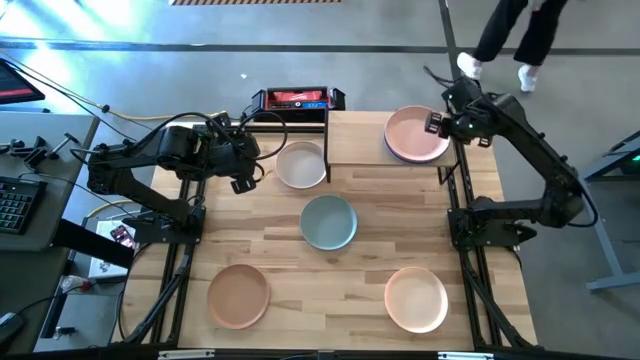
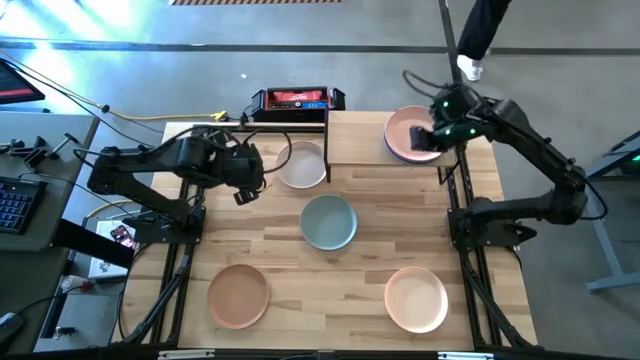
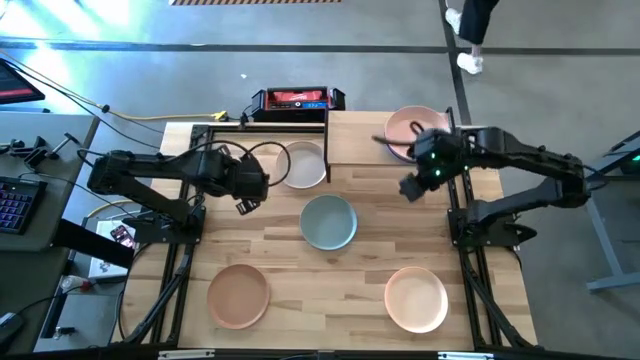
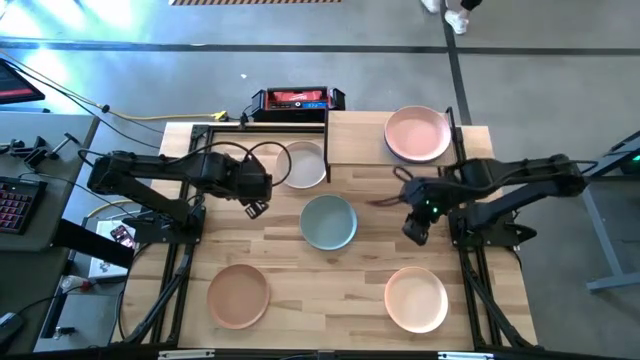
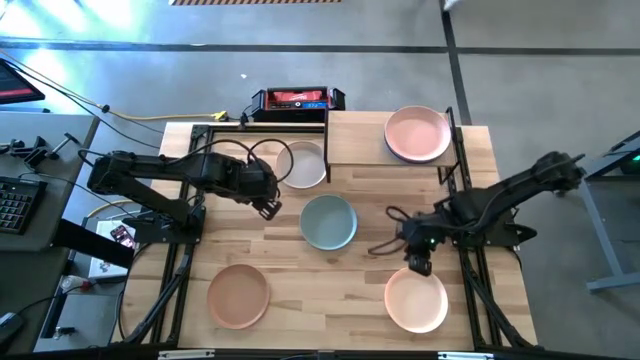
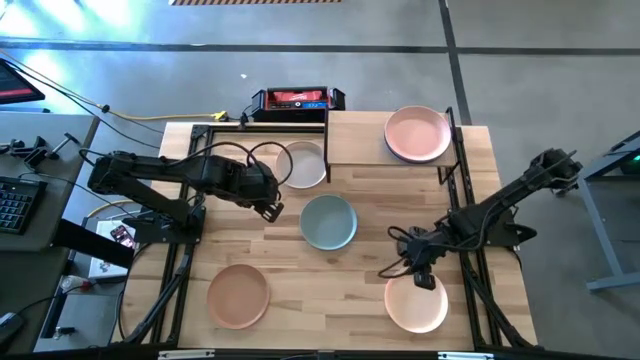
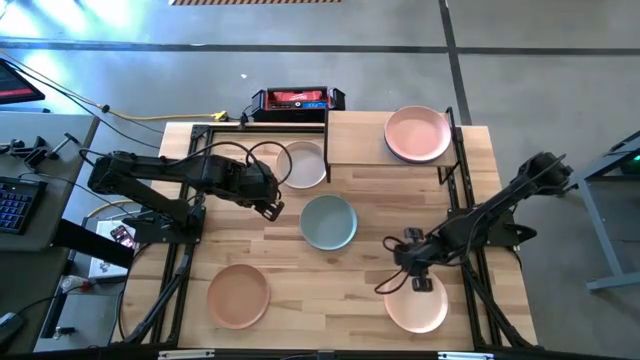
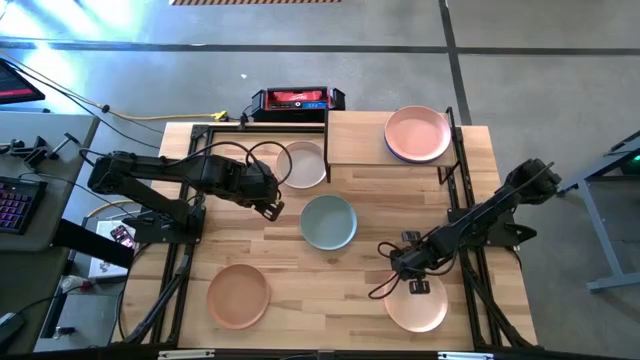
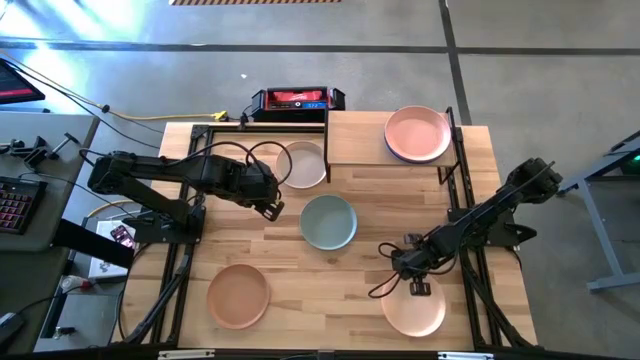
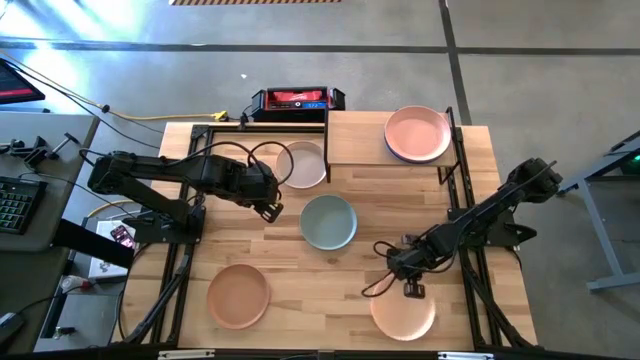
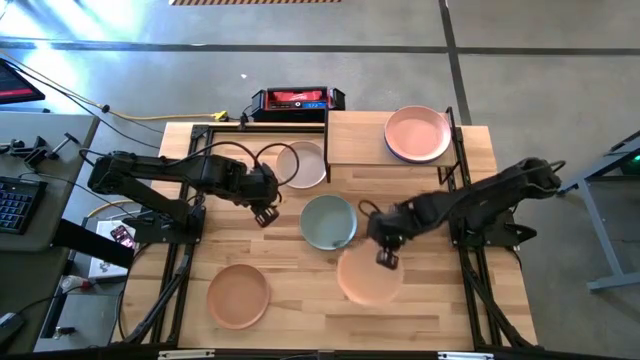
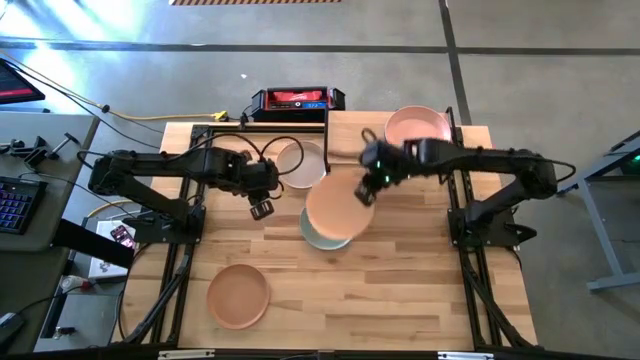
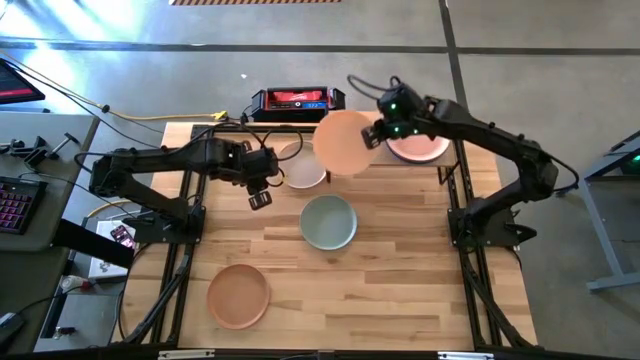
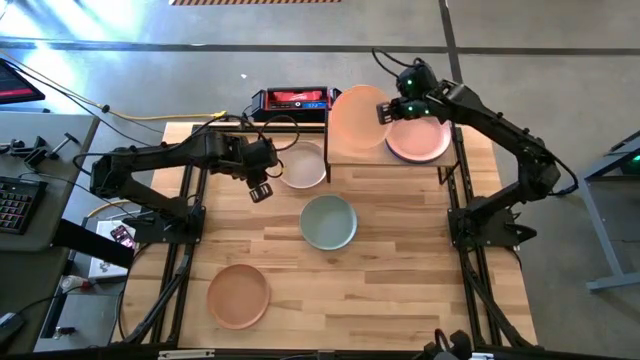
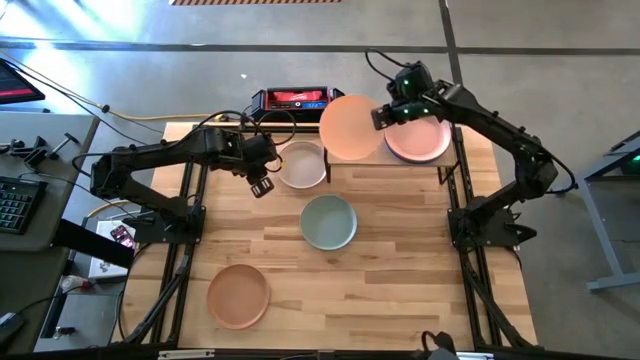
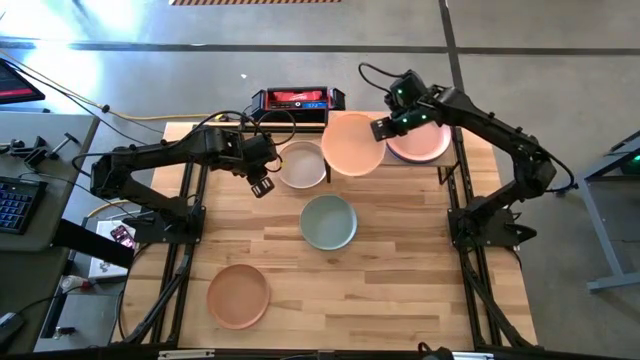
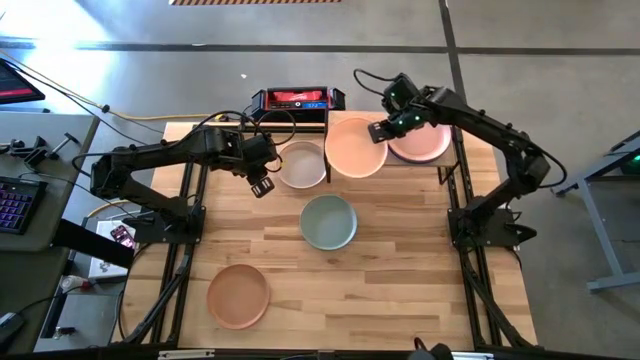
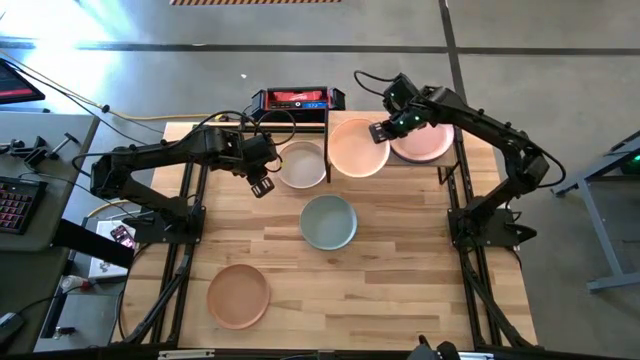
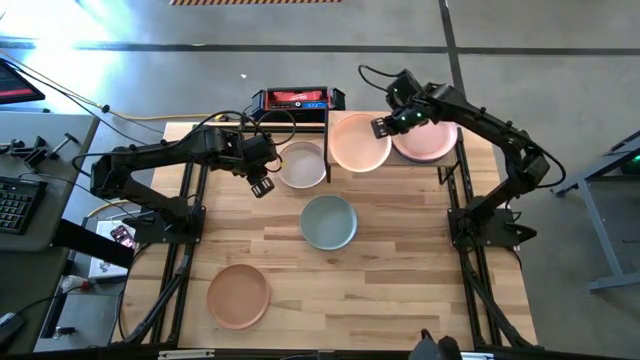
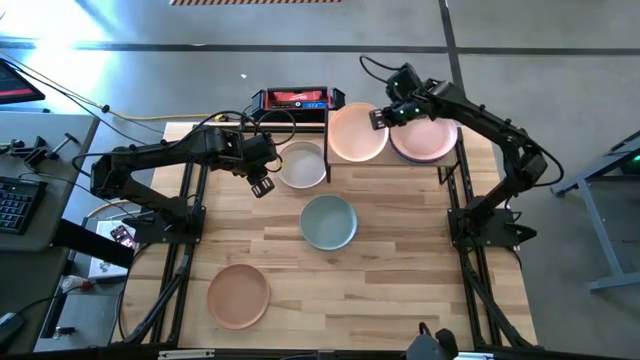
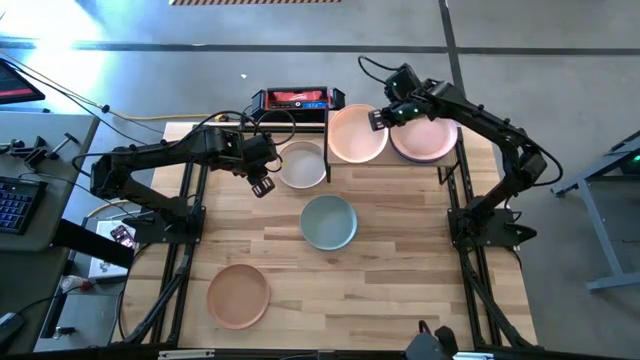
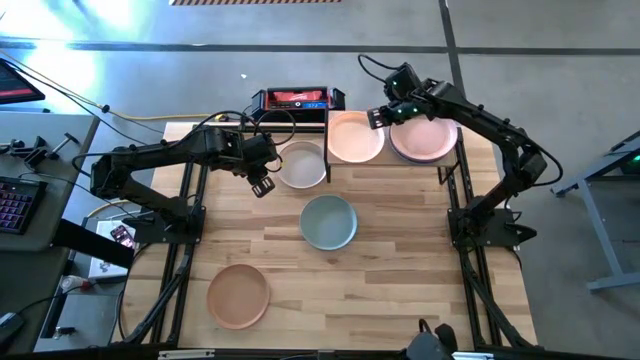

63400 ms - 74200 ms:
Task: Place and stack plates onto a shelf
Put the white plate on the shelf

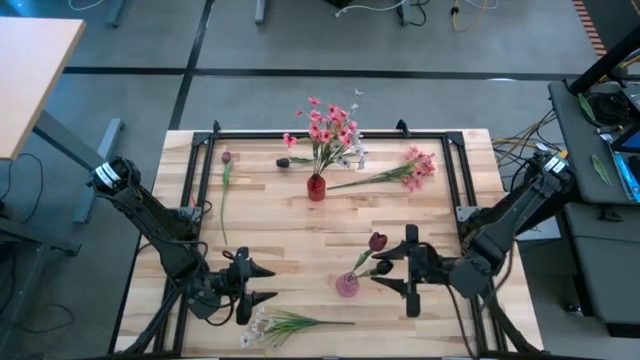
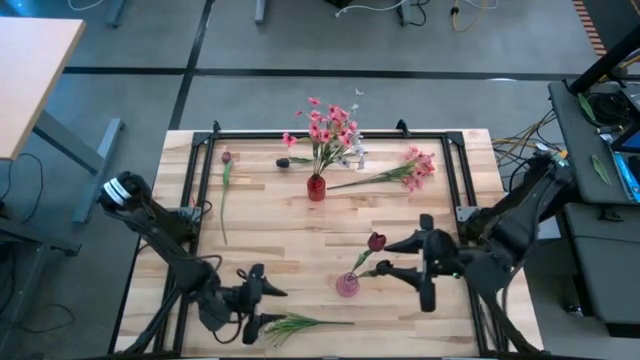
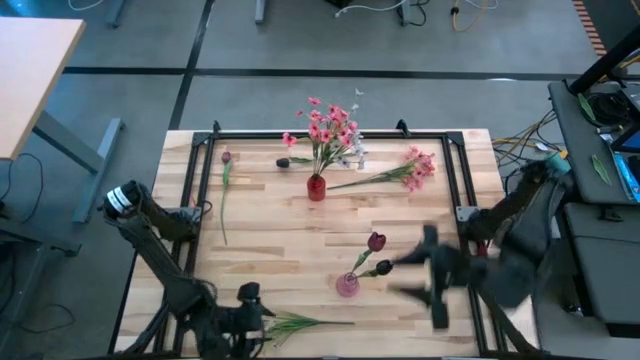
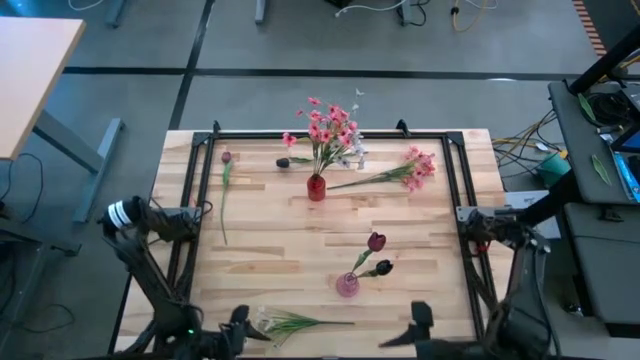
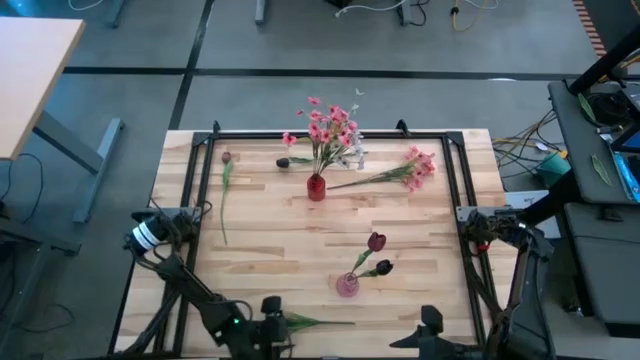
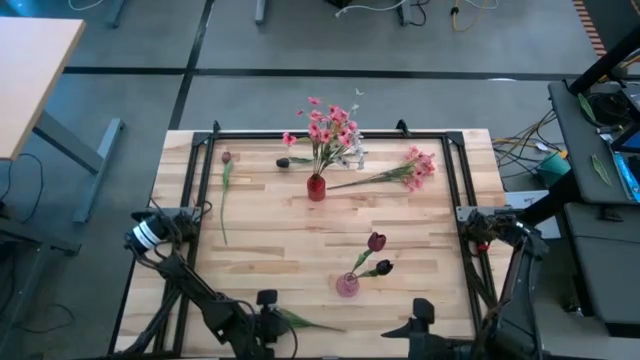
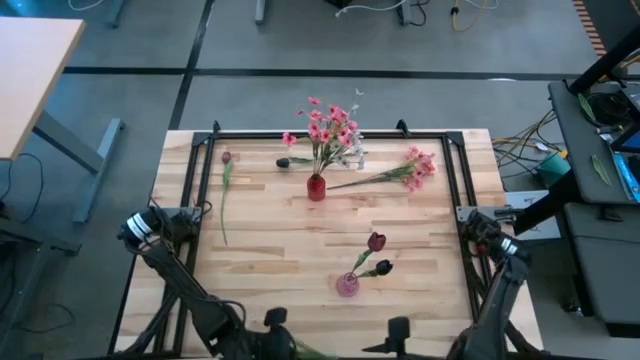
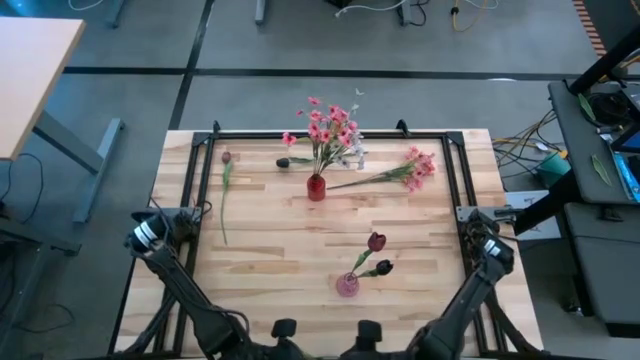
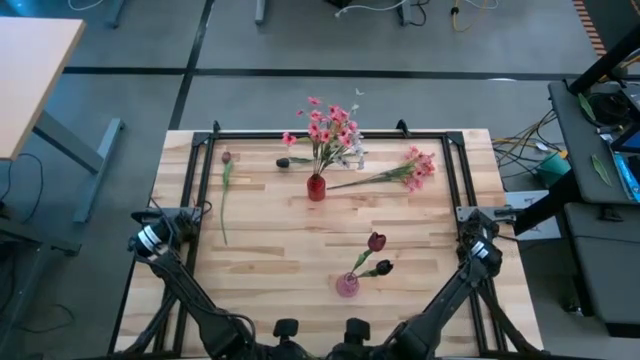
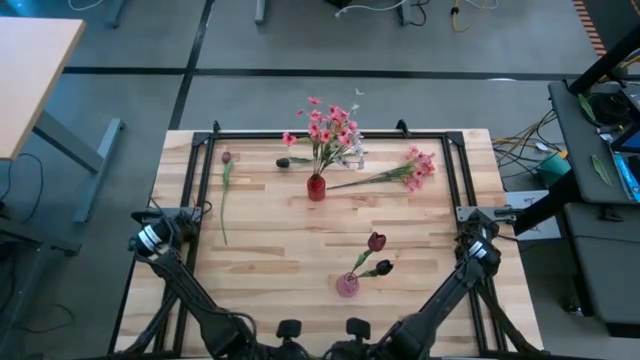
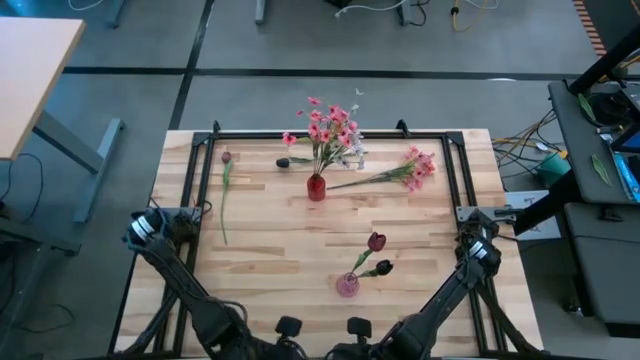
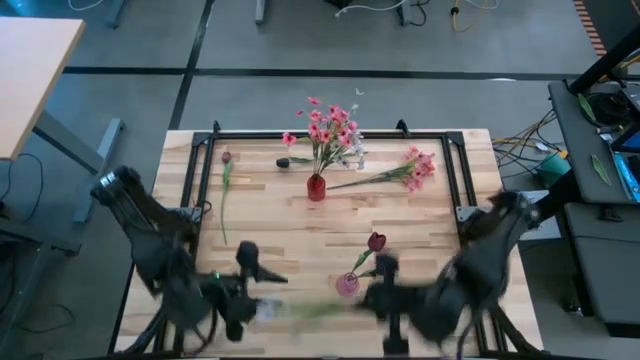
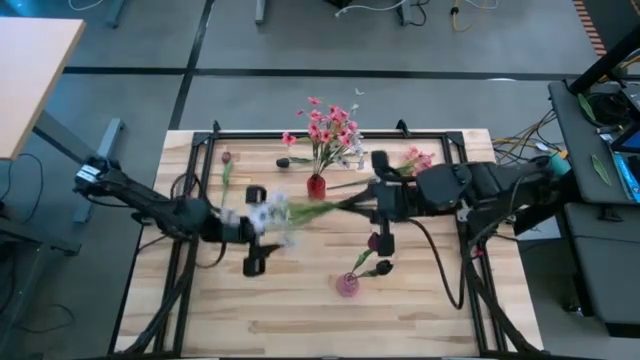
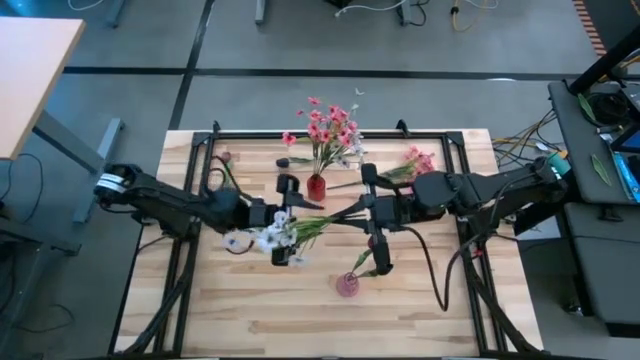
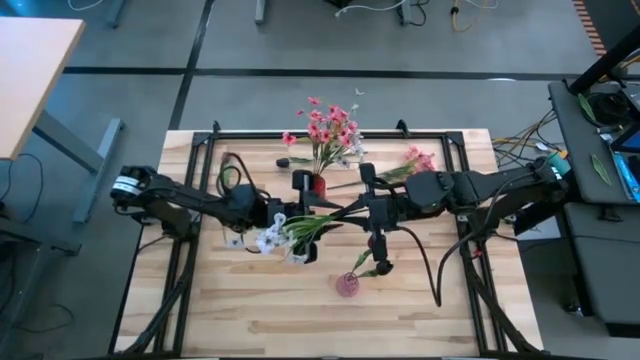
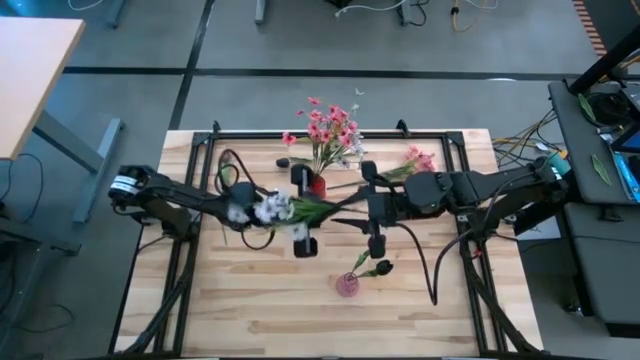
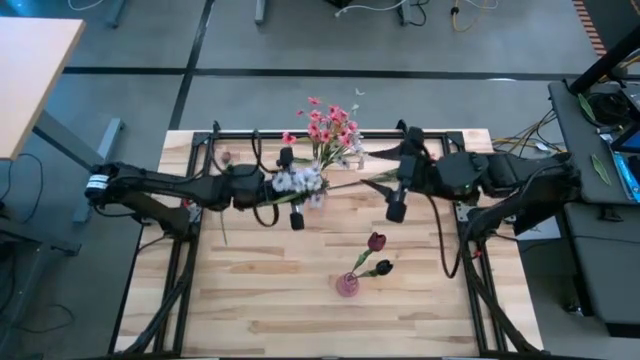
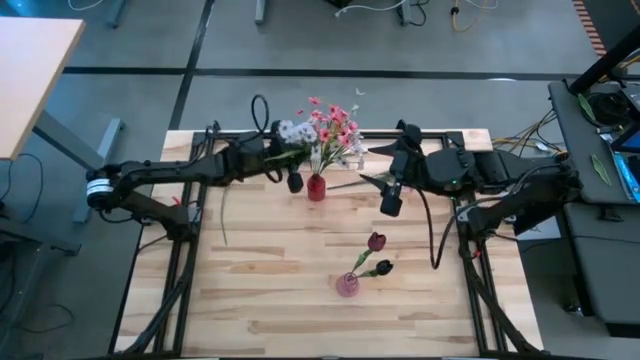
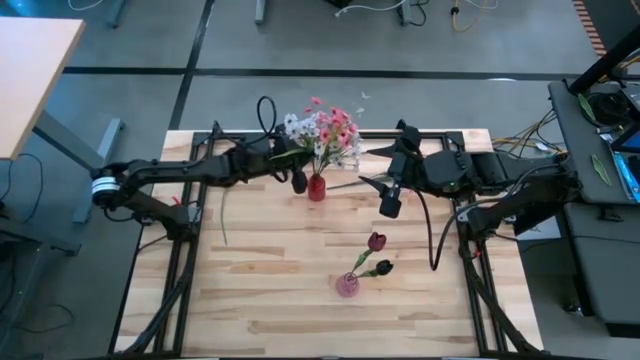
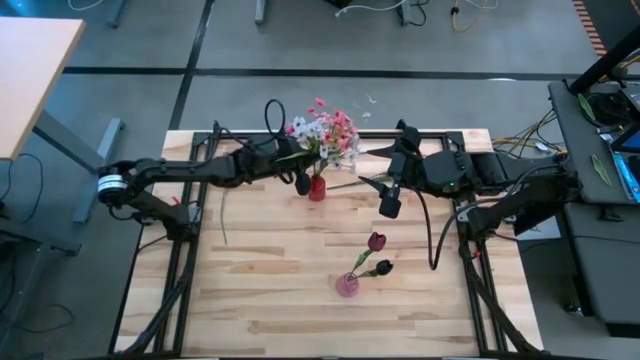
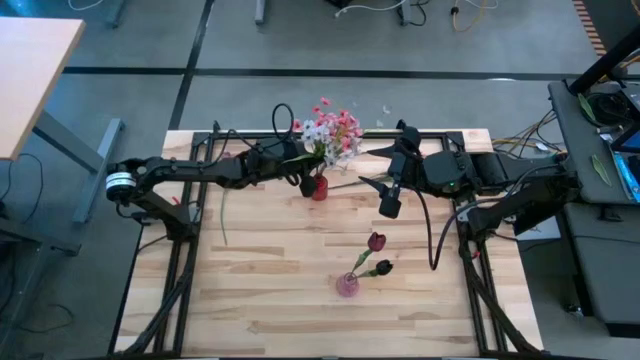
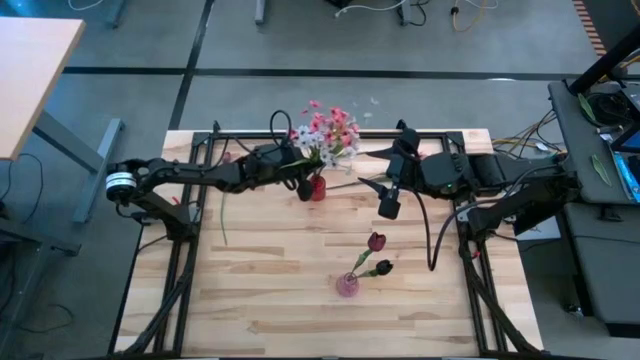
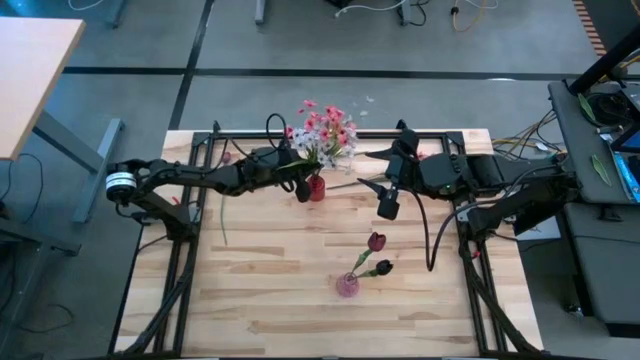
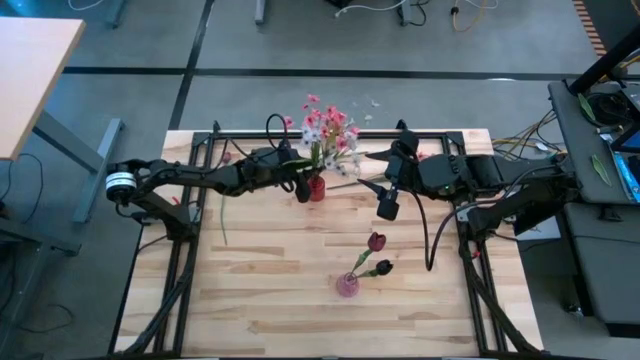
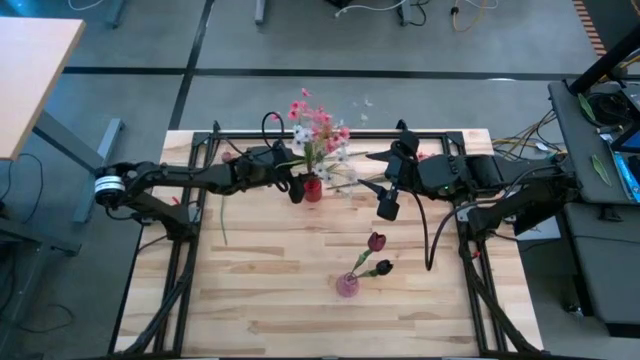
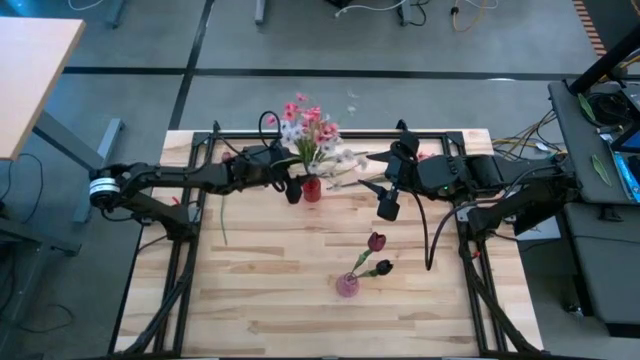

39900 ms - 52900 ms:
Task: Sort flowers into vase by color
Put the white flowers into the red vase
